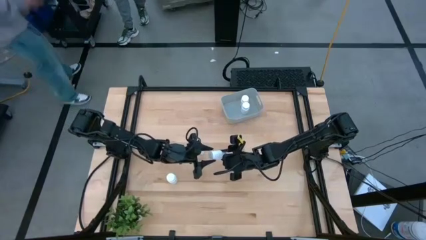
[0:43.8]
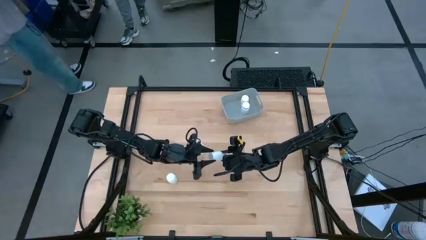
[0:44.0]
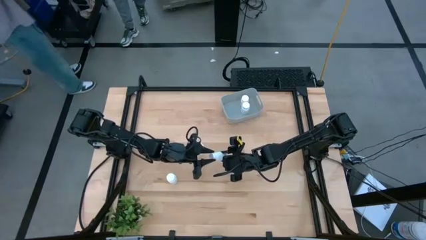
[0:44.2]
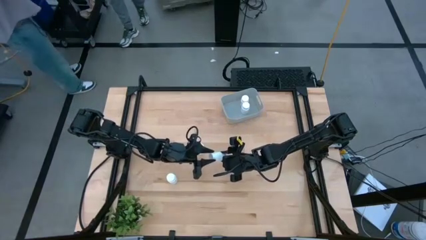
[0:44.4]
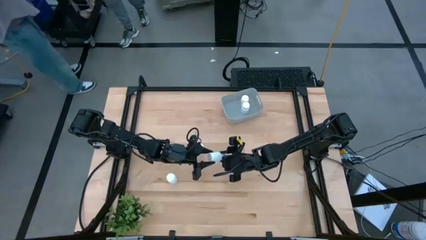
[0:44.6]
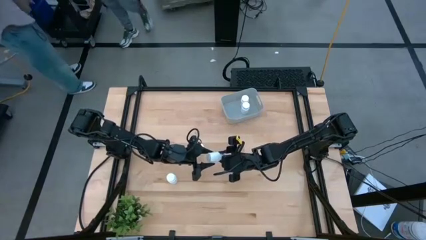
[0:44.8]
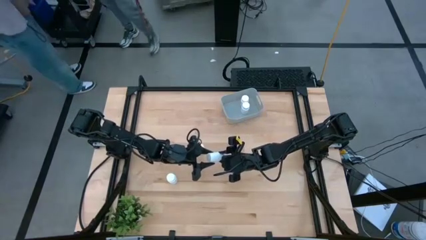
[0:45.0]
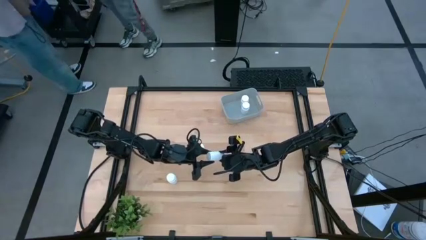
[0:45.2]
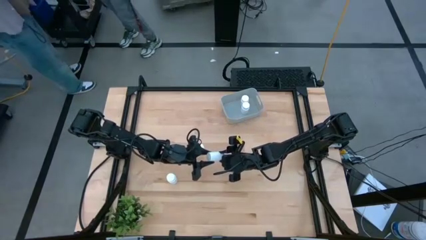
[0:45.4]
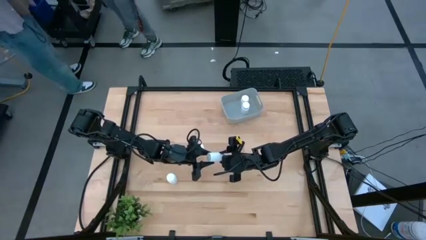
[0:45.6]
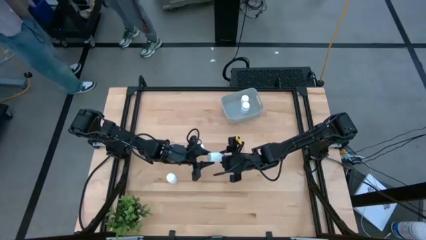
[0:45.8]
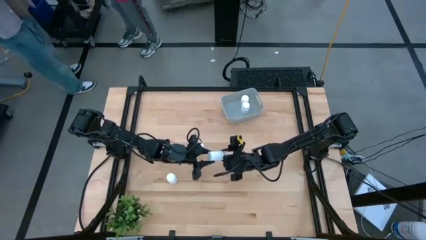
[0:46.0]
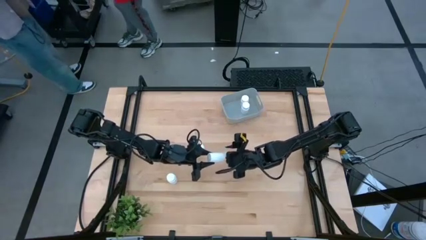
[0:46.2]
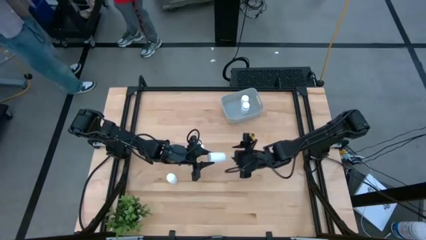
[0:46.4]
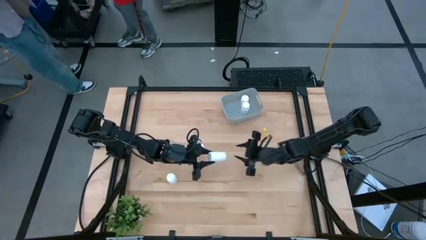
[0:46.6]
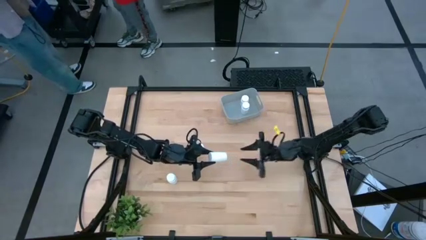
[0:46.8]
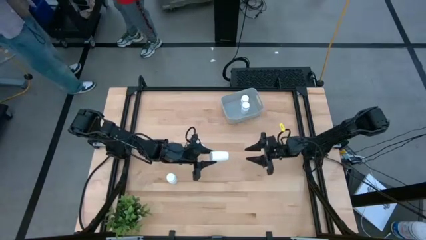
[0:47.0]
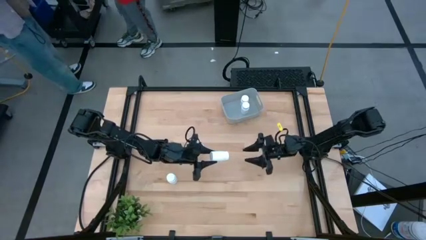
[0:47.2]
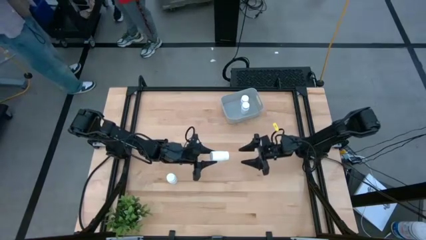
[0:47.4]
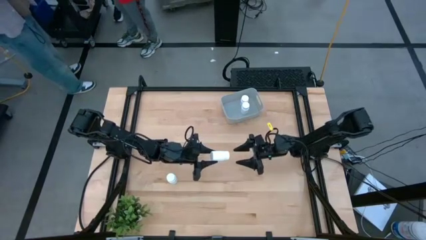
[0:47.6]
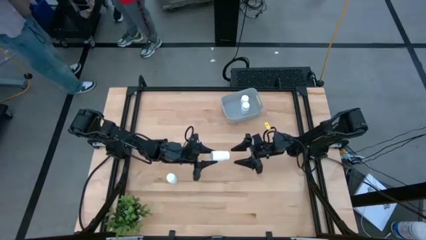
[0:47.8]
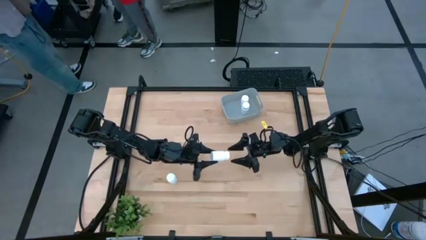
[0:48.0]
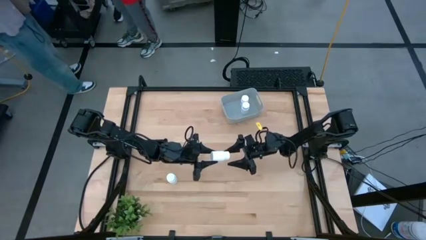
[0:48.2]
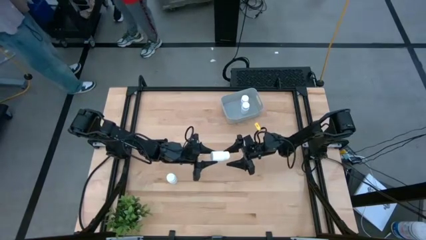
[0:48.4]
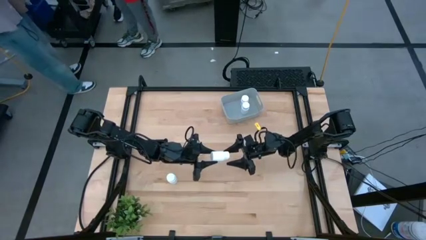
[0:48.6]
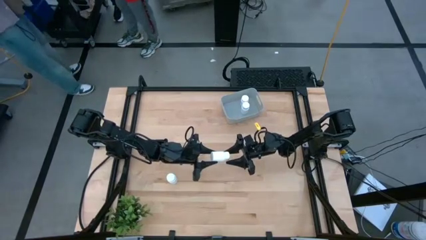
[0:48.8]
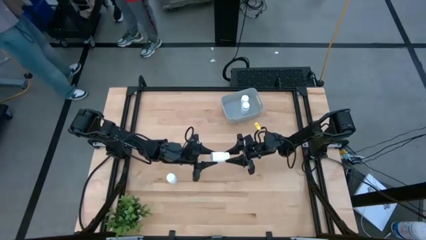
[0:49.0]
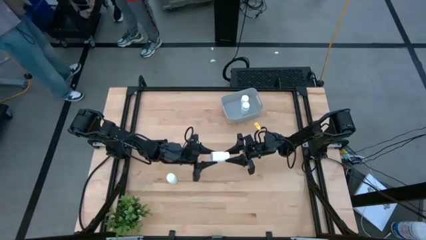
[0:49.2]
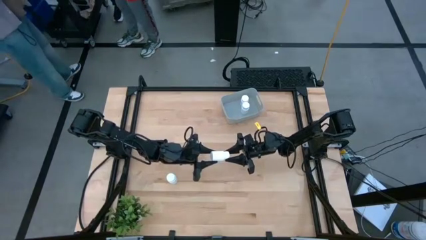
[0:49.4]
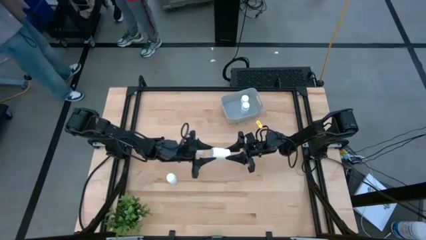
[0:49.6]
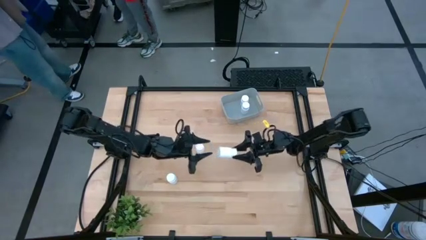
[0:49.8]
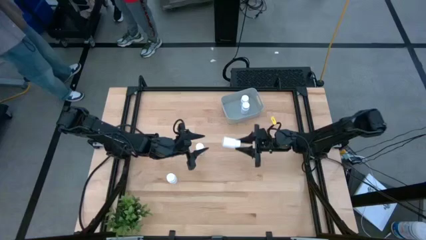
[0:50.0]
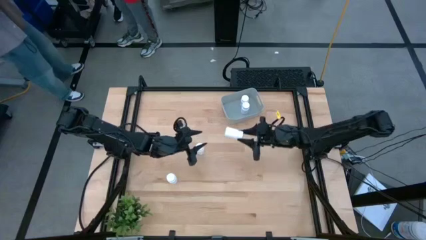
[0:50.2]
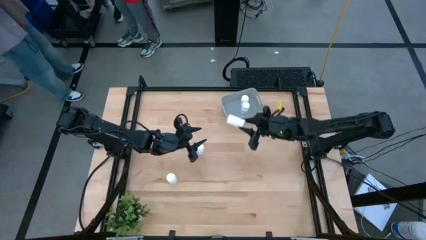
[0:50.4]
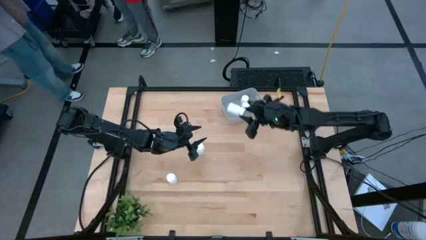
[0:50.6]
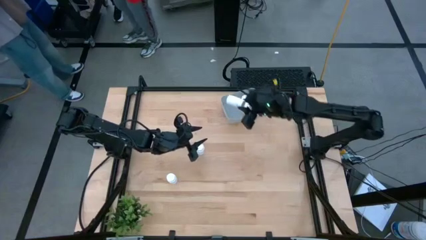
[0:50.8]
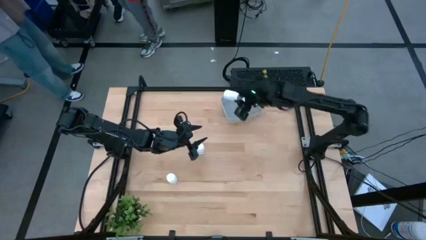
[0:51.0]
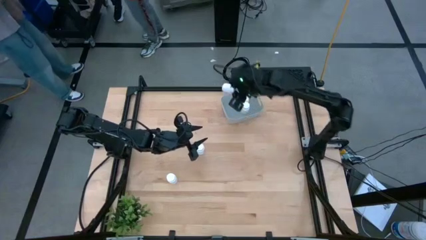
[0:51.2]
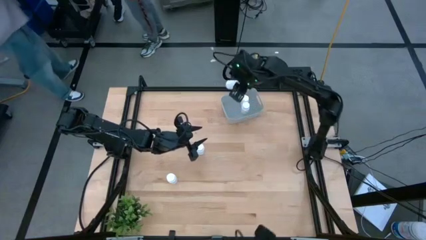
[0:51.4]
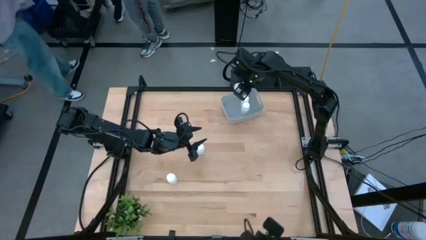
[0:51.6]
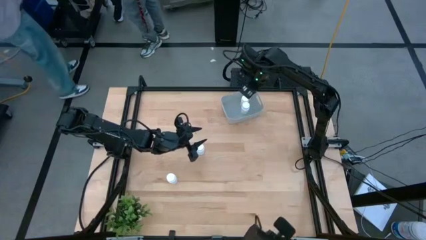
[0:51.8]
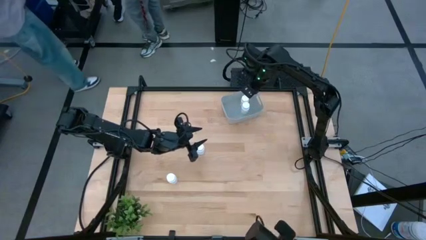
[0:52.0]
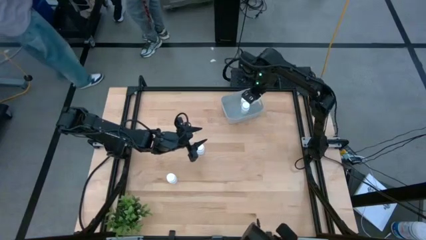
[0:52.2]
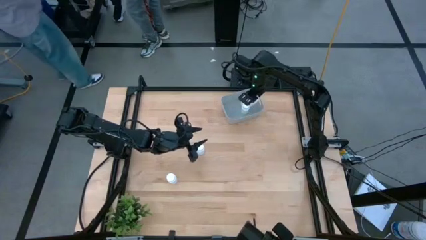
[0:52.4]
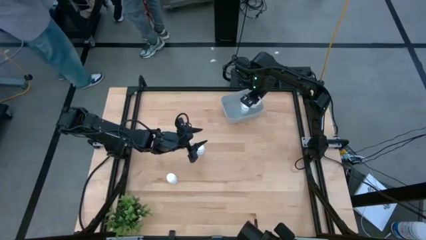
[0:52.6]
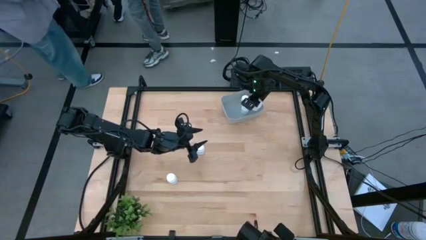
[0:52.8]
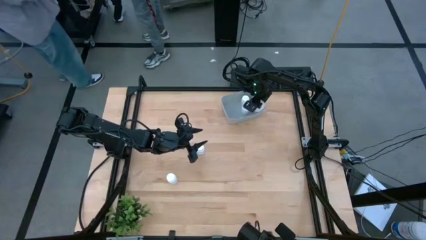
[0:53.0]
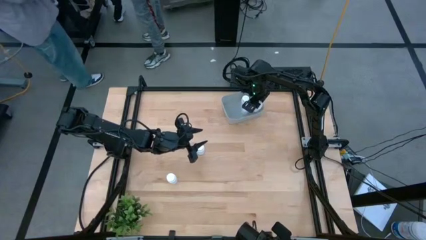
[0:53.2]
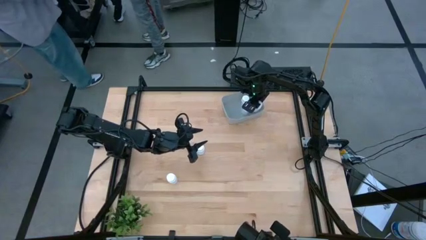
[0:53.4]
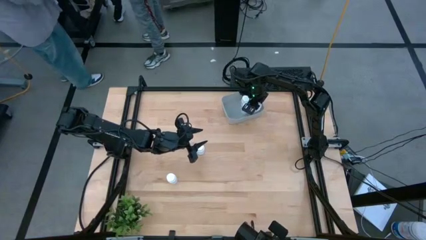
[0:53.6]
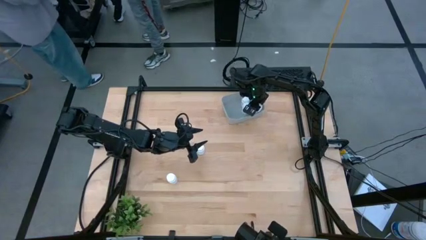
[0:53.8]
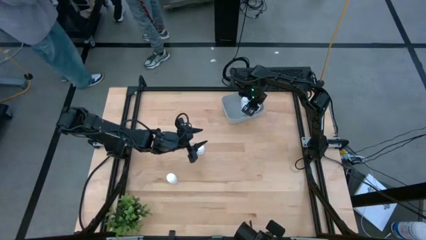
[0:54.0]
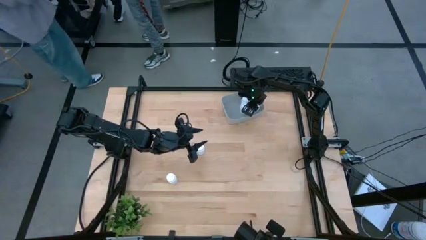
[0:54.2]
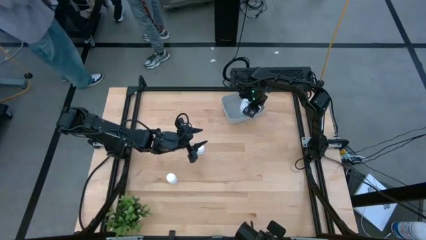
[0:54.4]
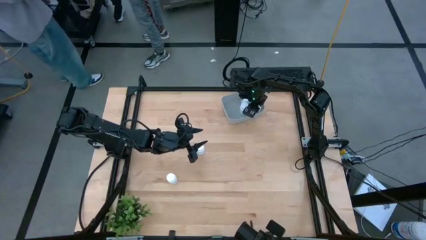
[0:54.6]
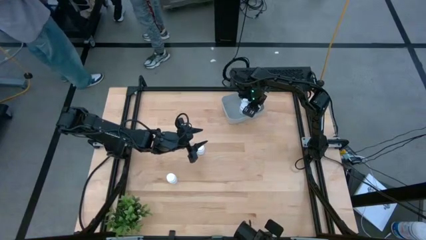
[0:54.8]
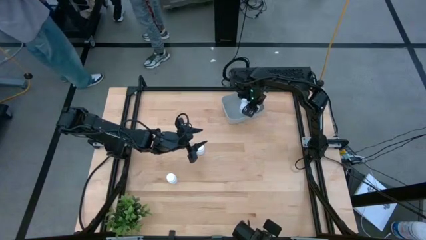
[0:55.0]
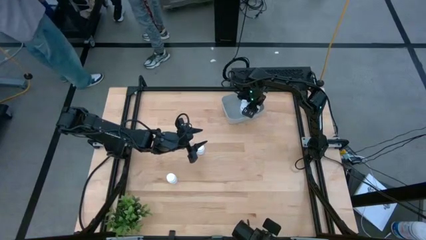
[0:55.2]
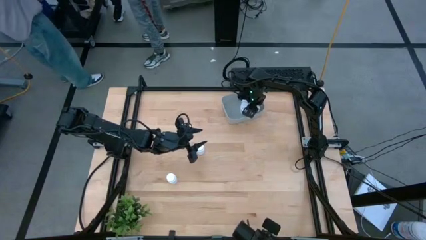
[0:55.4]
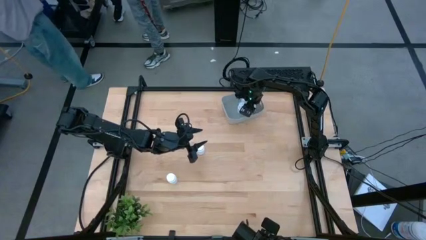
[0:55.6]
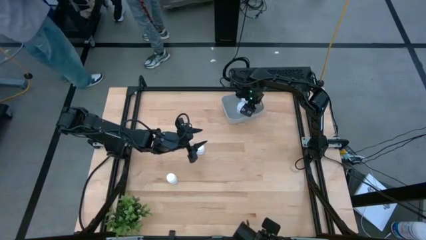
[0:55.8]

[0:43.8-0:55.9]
Task: Pick and place pill bottles into a basket
Put the white medicine bottle into the gray bin

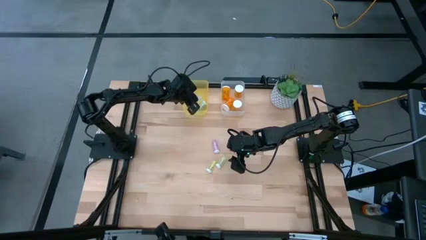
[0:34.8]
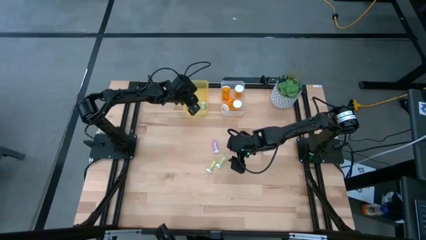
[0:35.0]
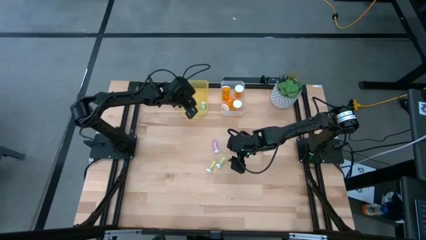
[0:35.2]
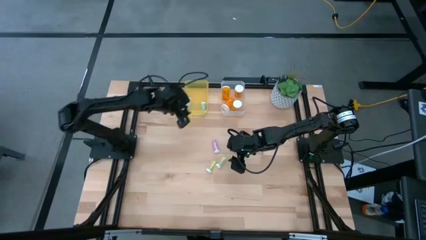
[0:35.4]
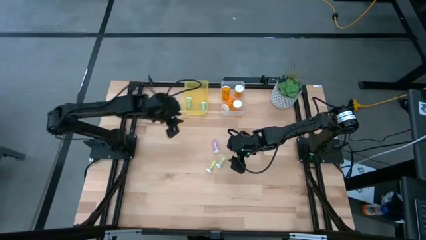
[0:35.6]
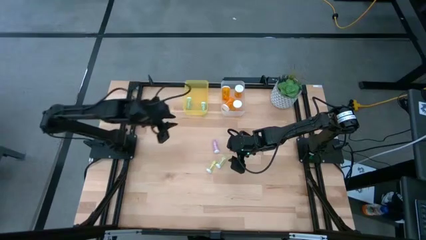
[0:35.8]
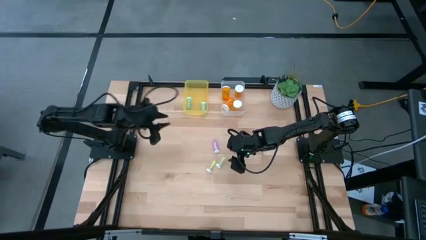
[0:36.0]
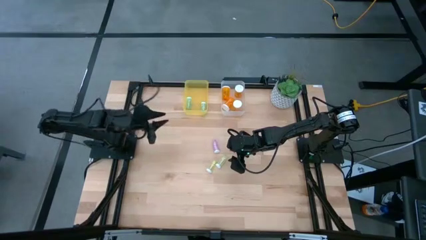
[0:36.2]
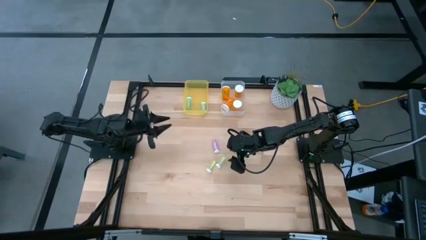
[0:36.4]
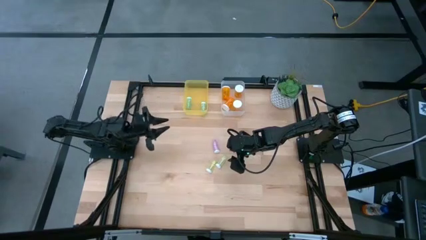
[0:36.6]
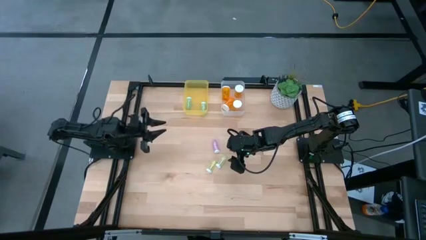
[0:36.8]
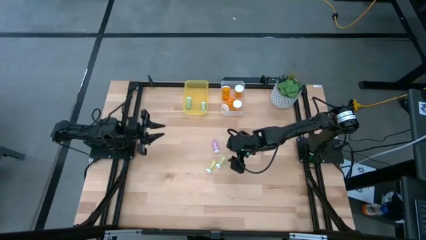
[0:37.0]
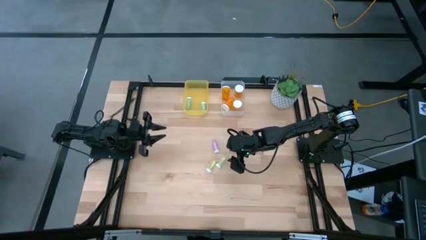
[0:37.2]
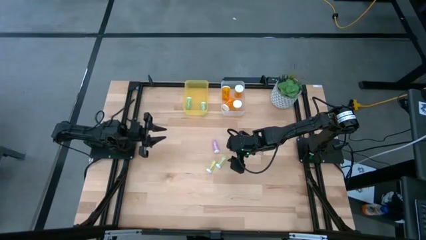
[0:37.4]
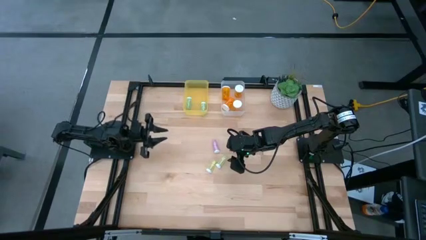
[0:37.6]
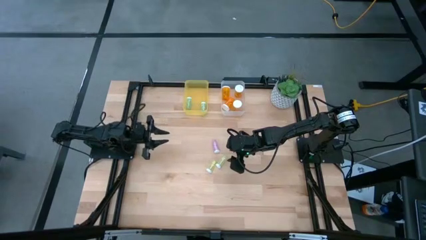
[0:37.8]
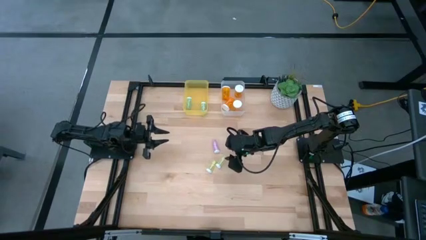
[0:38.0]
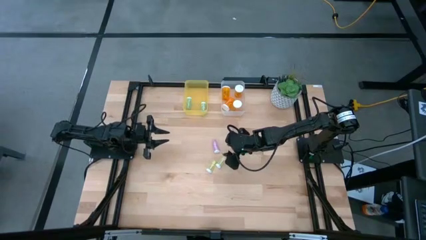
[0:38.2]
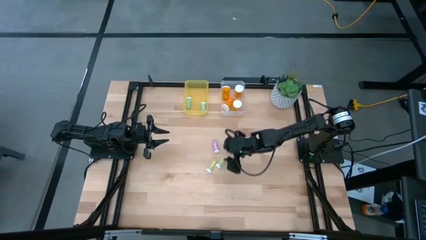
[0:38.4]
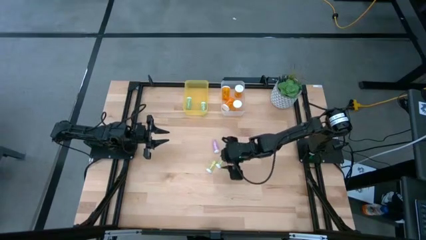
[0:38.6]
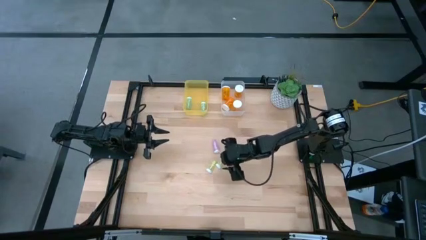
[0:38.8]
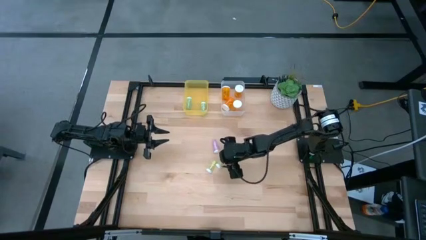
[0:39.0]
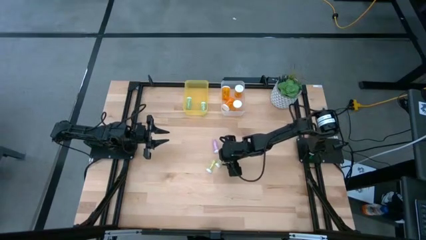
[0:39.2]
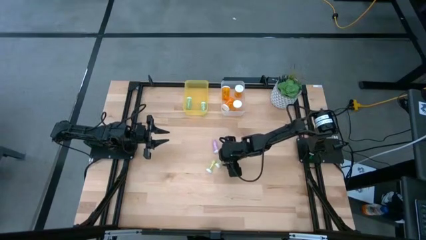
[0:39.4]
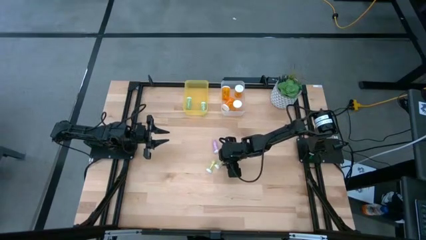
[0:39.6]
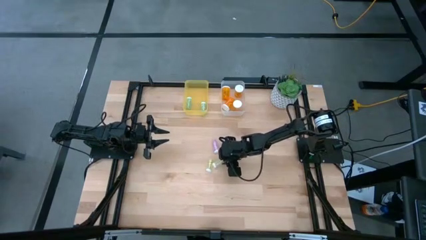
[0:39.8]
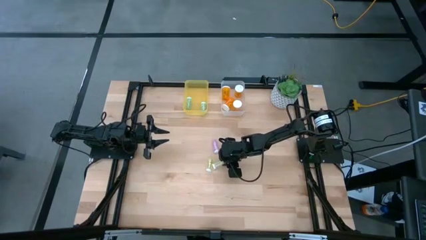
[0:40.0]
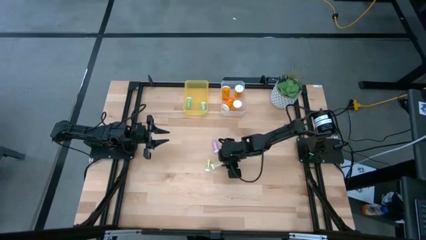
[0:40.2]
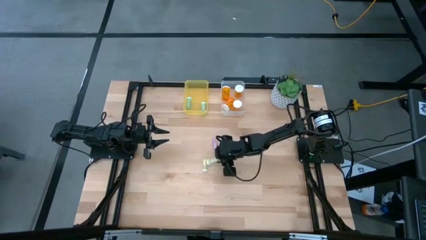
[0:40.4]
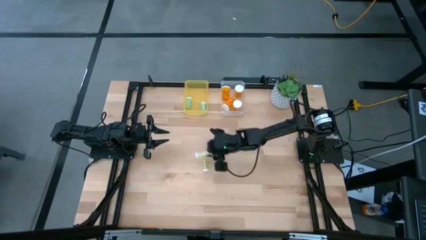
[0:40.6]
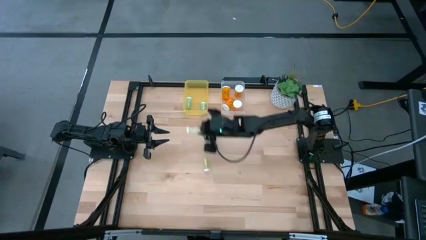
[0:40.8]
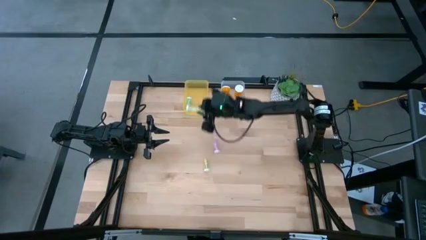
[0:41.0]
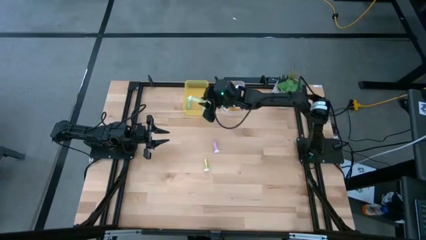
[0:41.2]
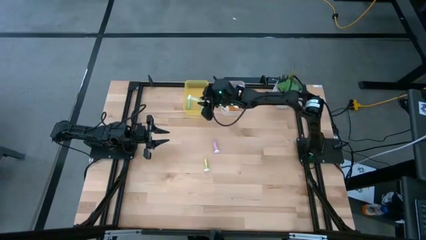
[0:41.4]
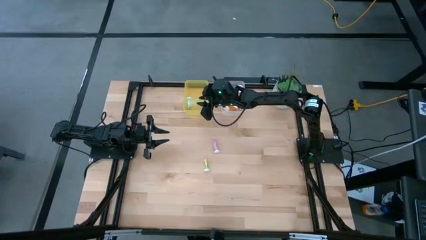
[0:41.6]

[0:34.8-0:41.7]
Task: Pick and place medicine bottles into bin by pill shape (circle, oval)
Put the yellow tablet bottle into the yellow bin
